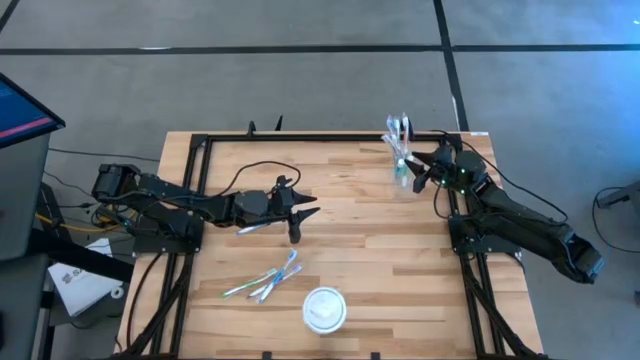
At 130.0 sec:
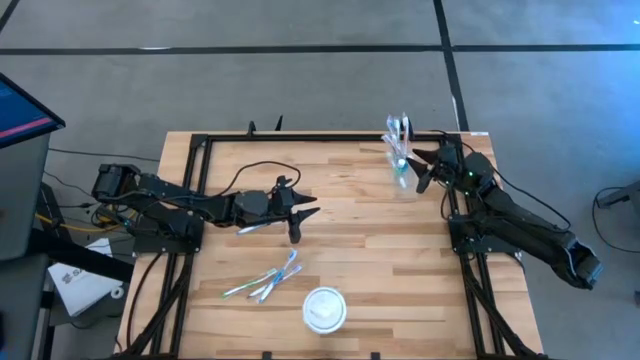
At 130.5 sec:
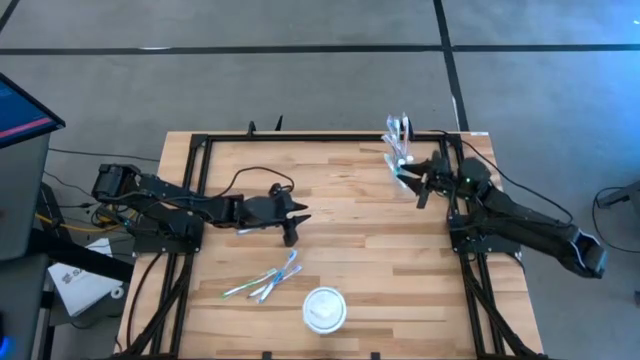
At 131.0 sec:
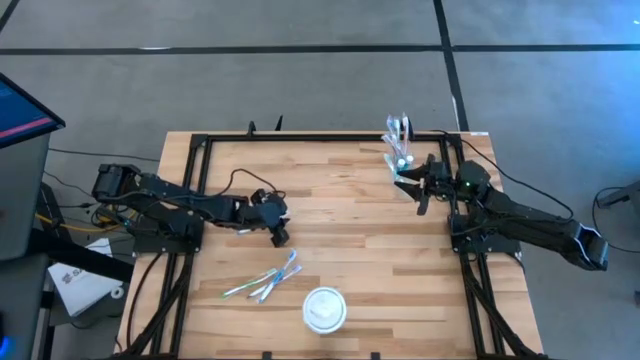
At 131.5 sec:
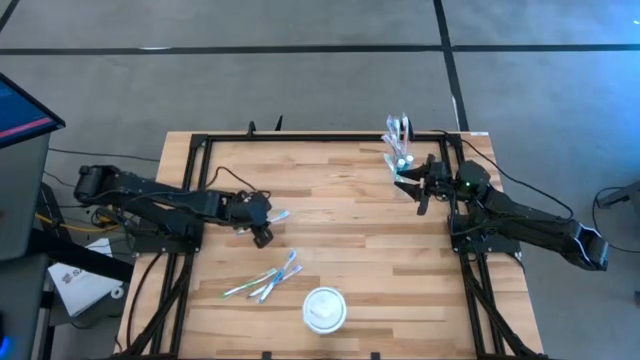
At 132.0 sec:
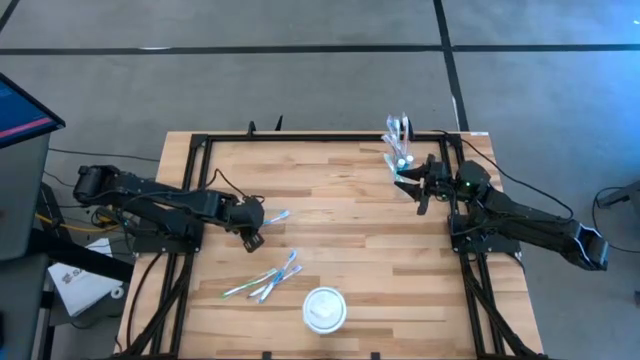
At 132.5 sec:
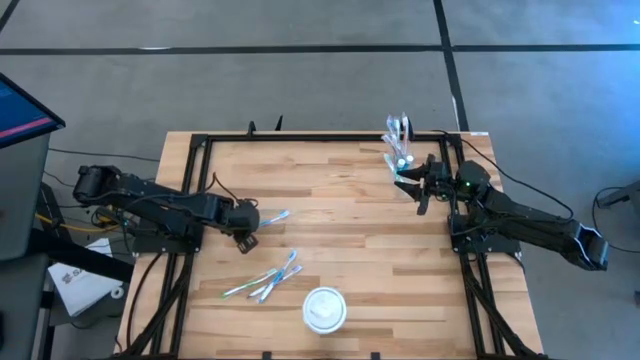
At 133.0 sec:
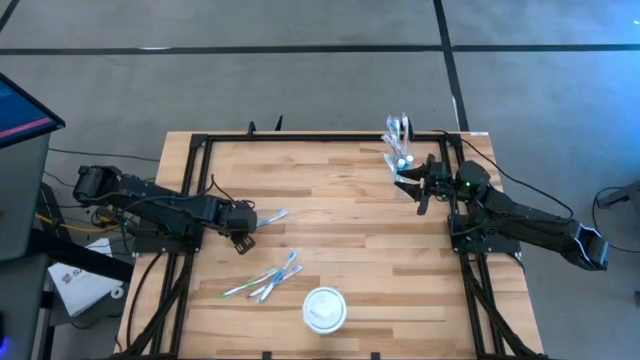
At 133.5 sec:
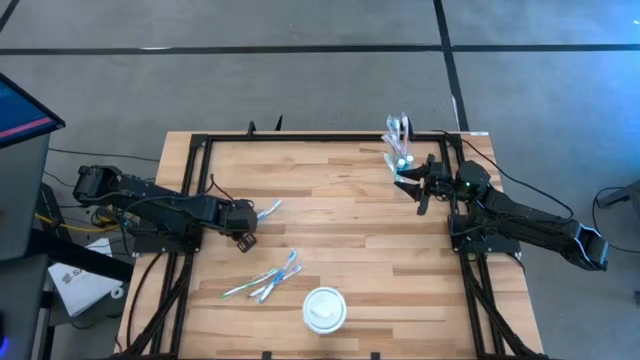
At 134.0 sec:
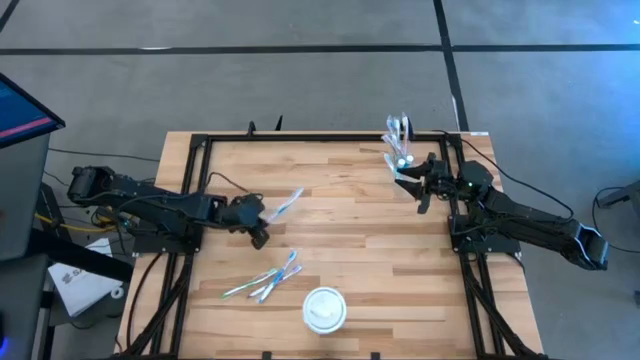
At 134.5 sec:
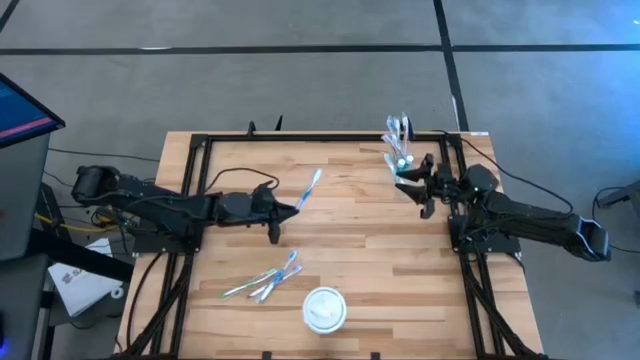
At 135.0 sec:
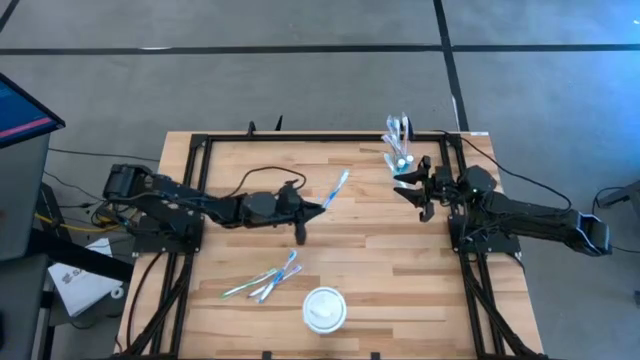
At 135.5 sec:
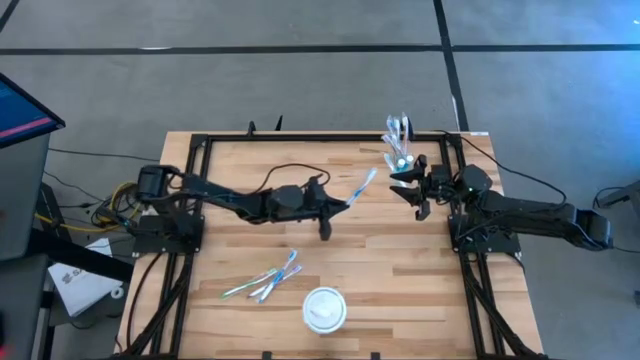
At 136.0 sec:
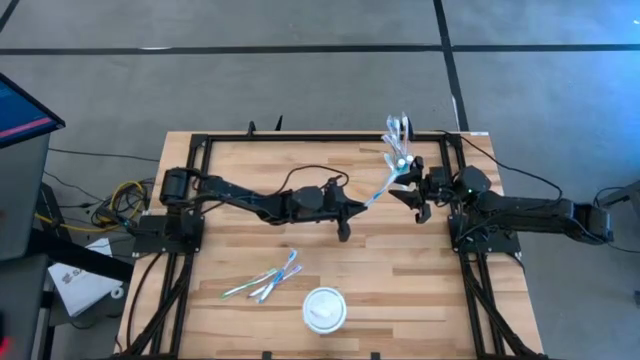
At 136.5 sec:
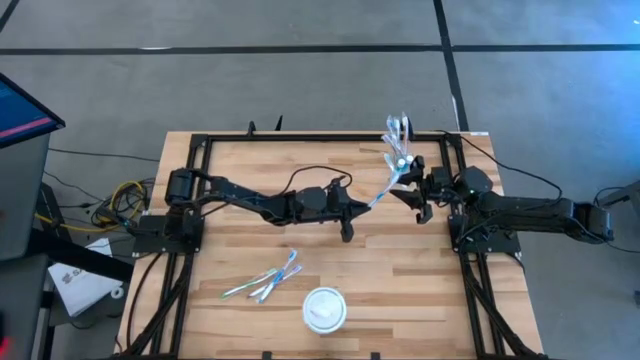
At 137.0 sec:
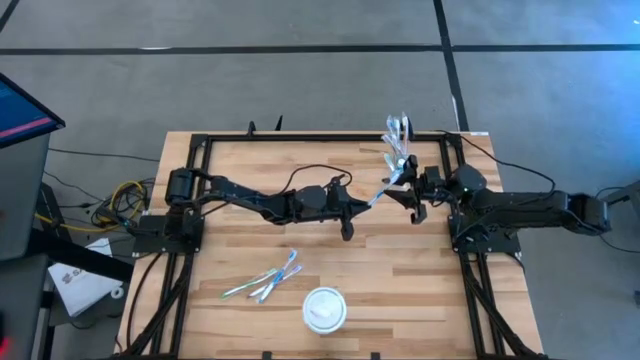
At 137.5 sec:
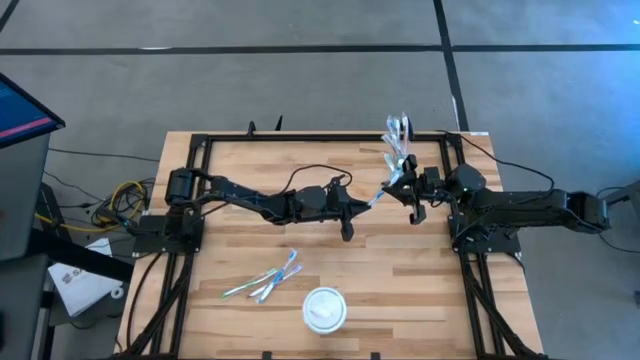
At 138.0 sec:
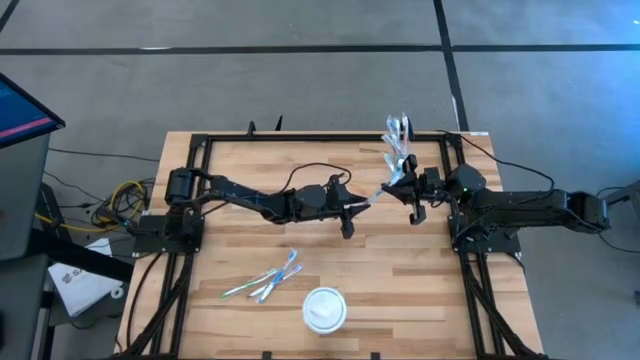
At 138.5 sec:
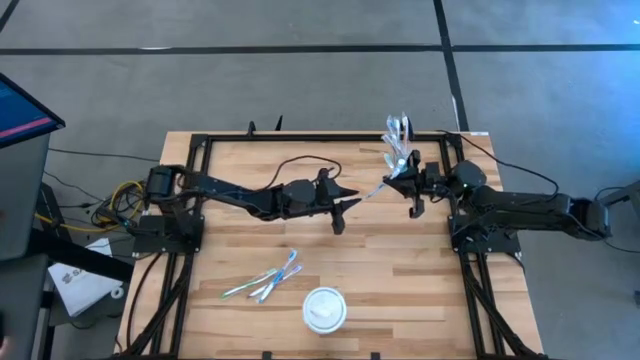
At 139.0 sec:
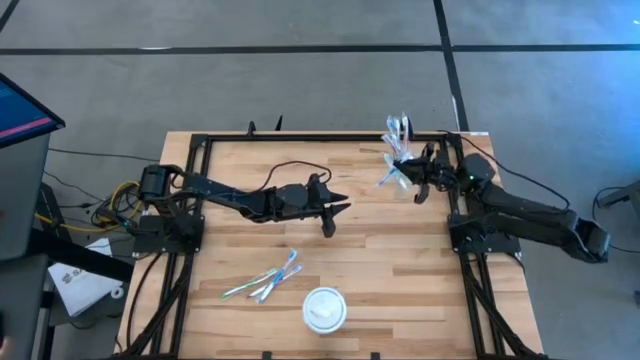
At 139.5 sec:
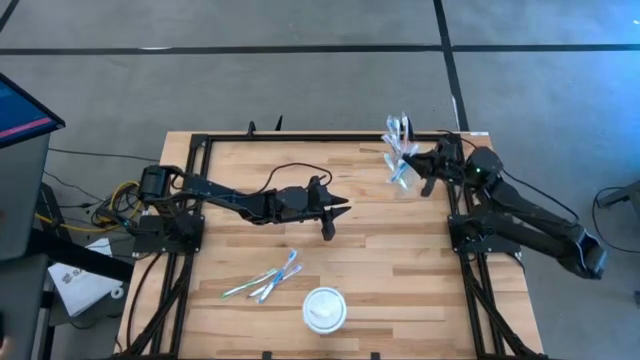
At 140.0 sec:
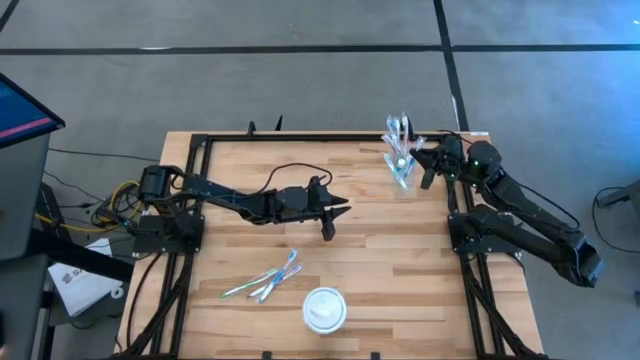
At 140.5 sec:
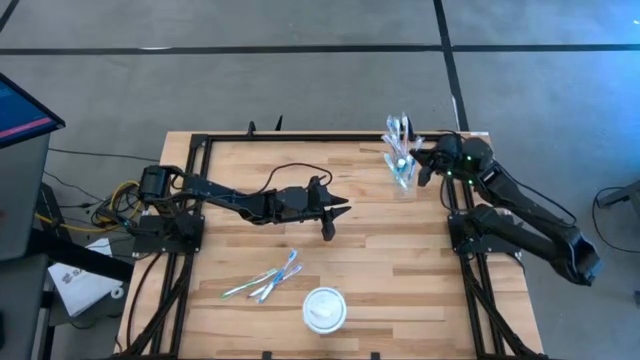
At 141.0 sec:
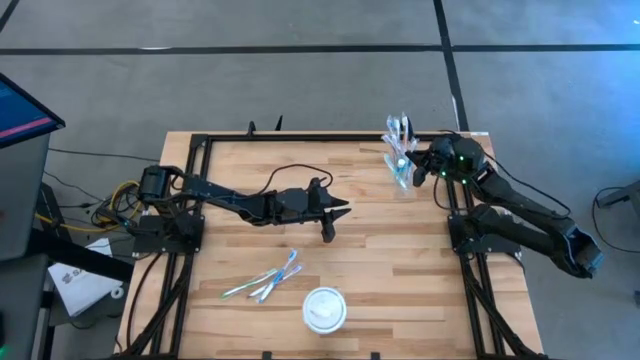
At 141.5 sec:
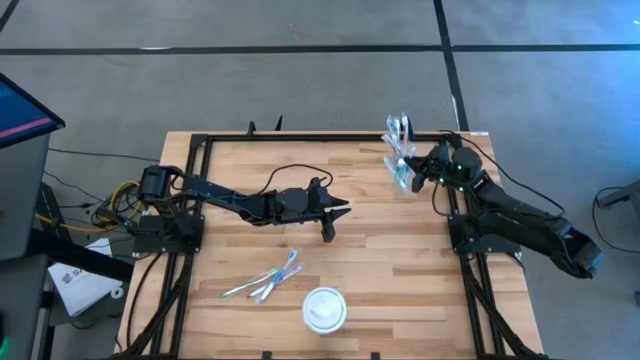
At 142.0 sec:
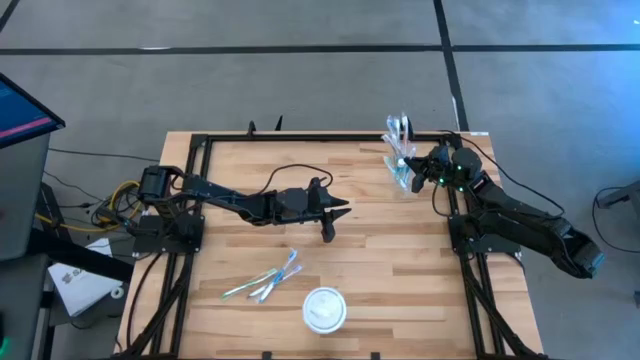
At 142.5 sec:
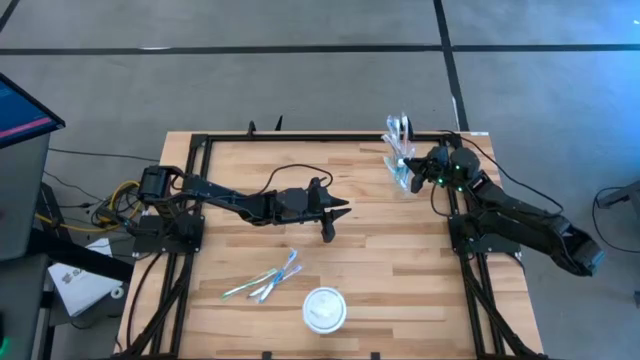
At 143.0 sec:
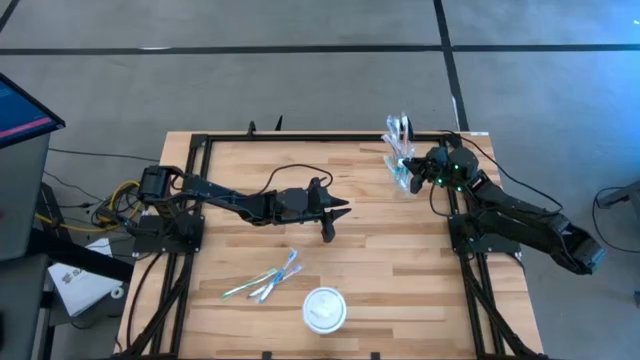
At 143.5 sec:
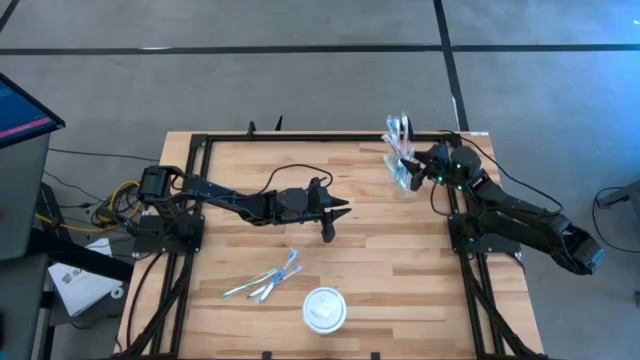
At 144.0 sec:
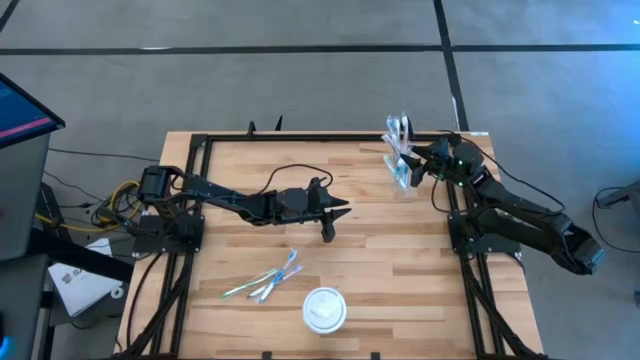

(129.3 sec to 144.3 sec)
Task: Pick & Place toothbrushing station
Put the blue toothbrush into the transparent organizer

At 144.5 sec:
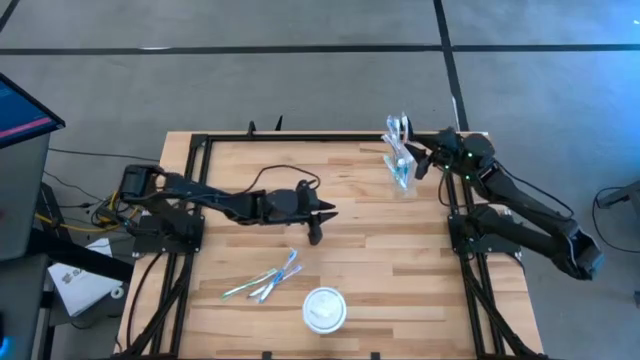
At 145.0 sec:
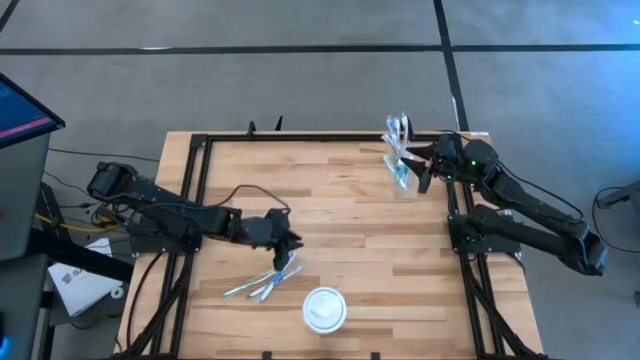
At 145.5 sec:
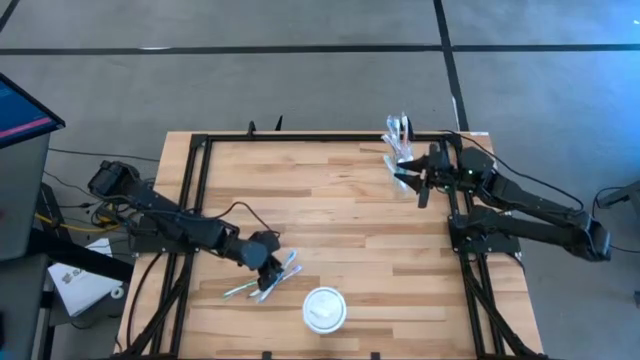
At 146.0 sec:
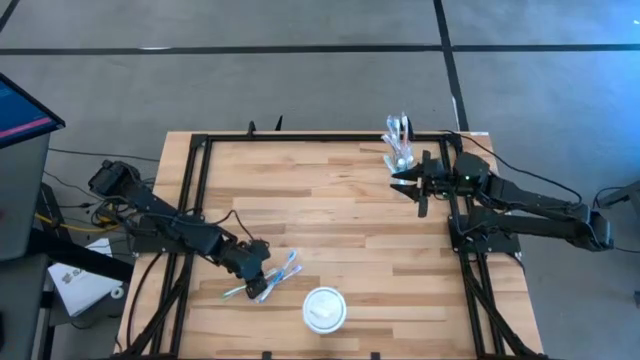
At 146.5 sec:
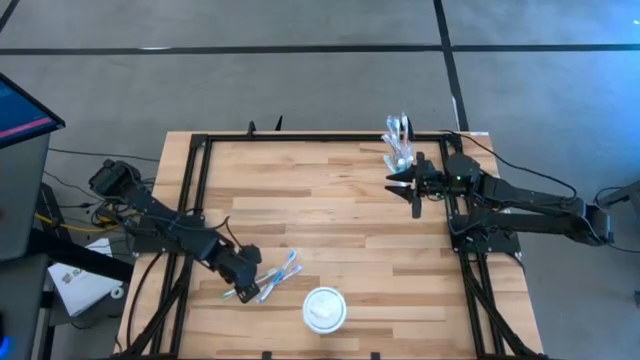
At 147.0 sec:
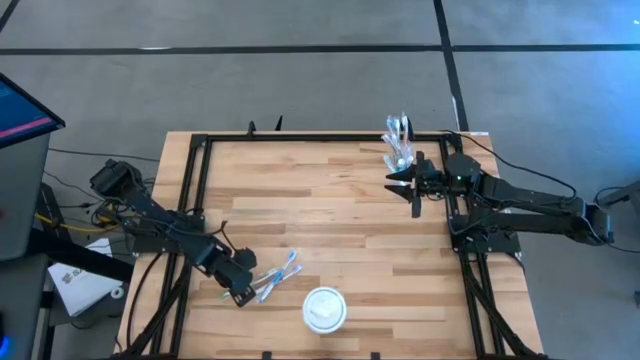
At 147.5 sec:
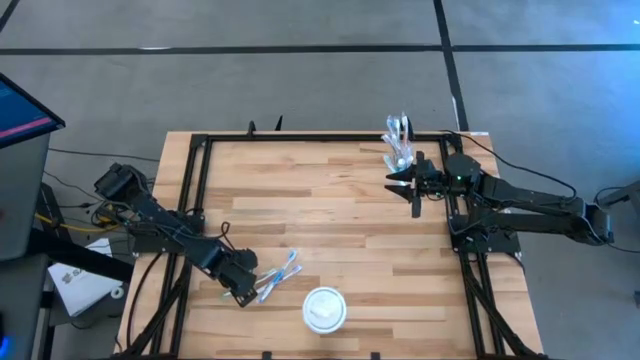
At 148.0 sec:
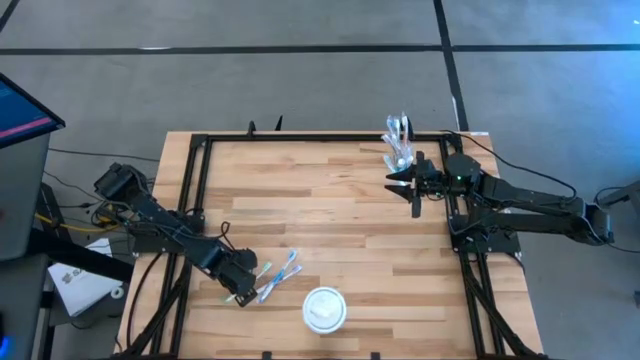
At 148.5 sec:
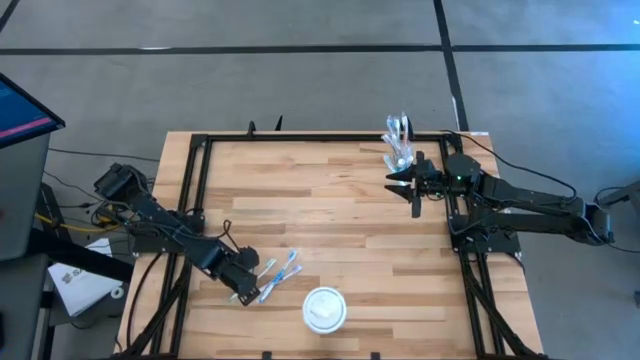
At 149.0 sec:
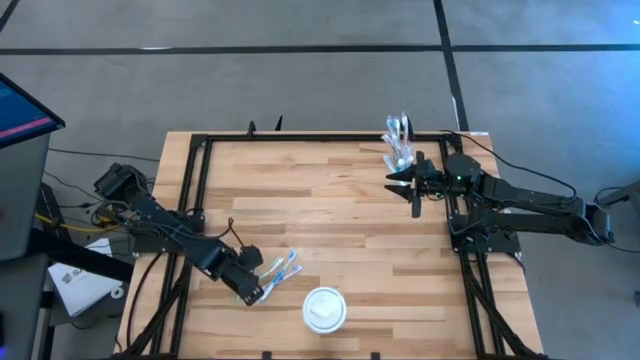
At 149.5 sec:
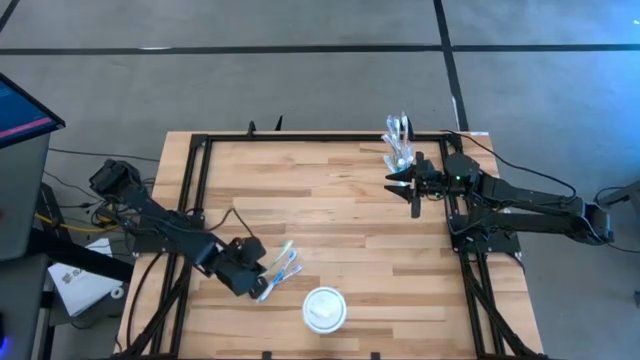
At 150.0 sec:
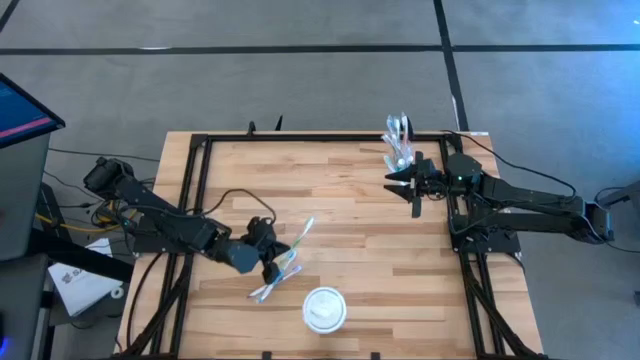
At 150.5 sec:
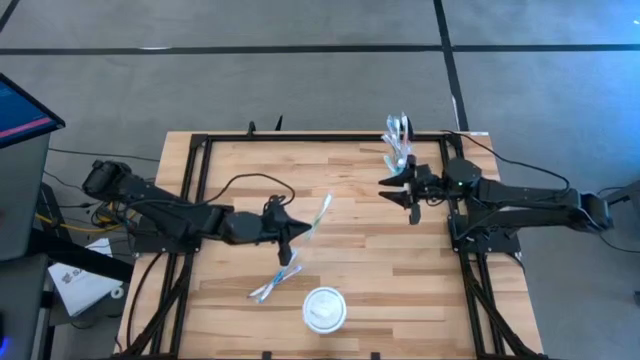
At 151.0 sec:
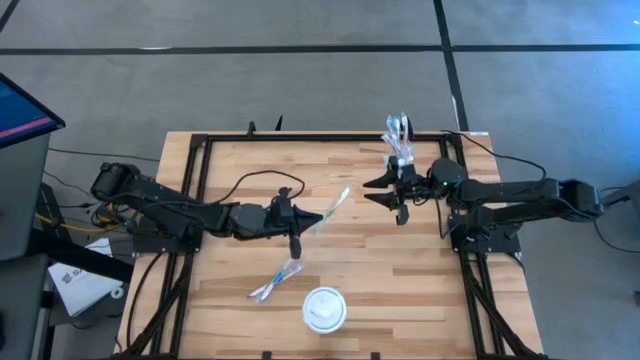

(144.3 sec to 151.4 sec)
Put the green toothbrush into the transparent organizer
